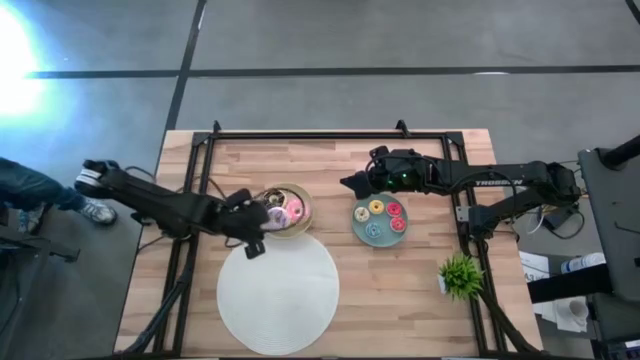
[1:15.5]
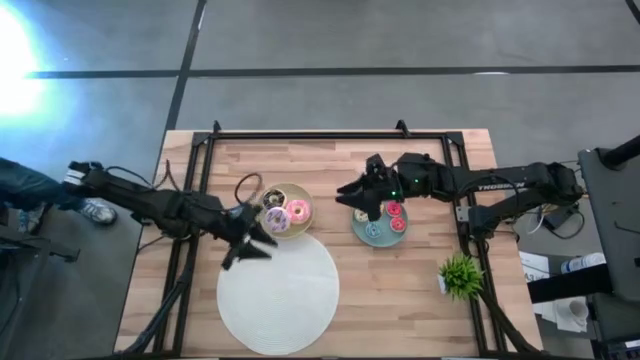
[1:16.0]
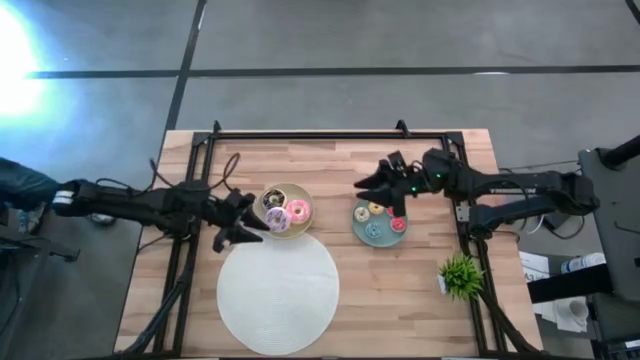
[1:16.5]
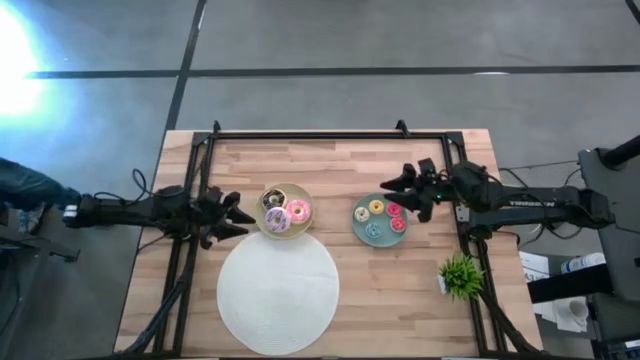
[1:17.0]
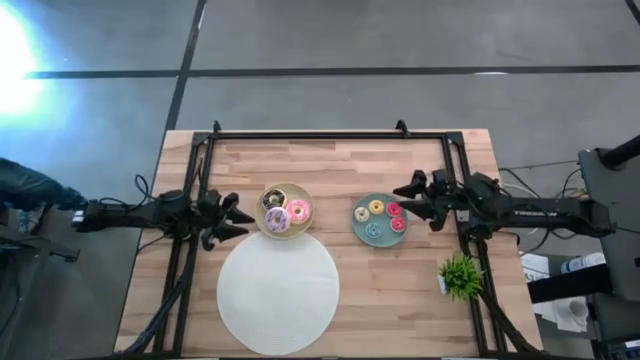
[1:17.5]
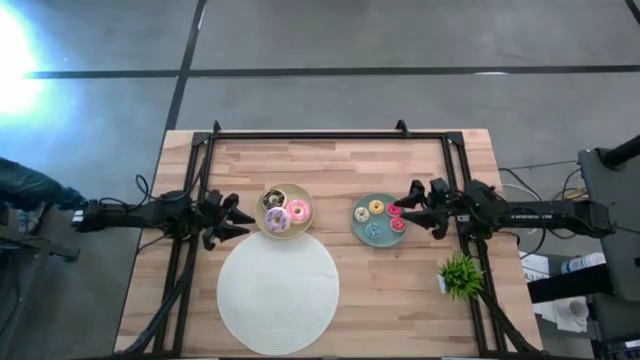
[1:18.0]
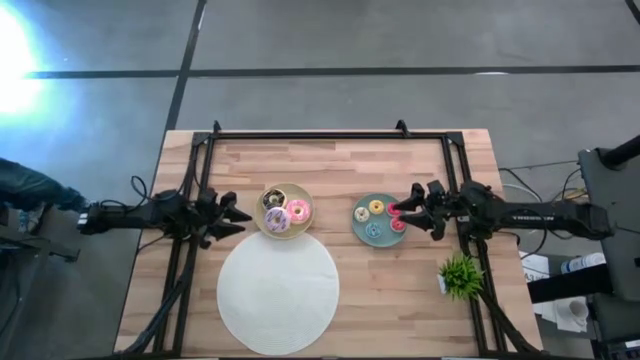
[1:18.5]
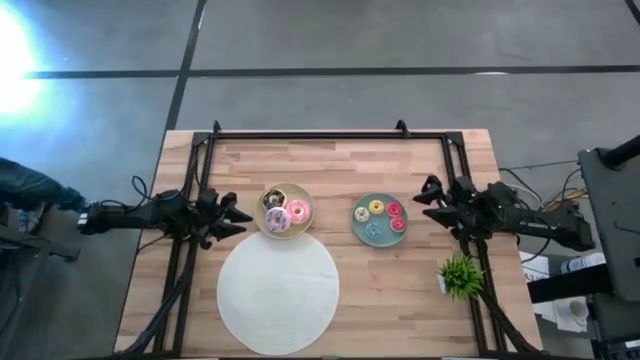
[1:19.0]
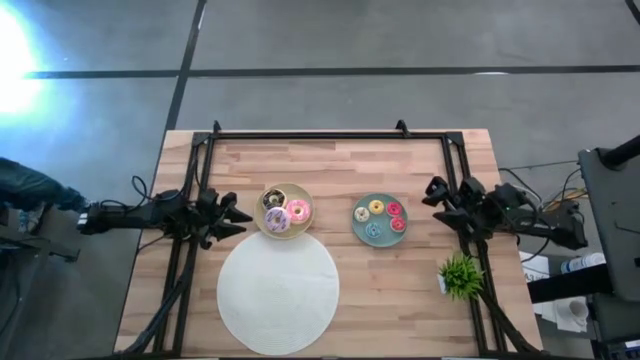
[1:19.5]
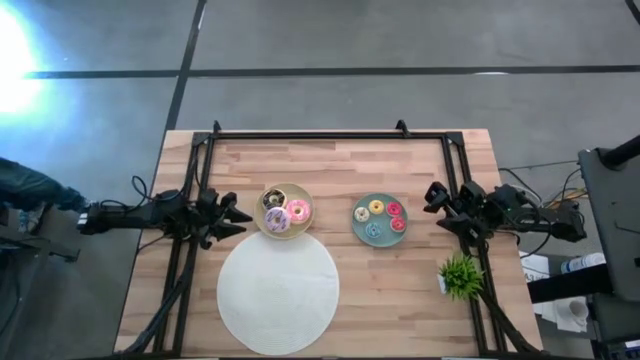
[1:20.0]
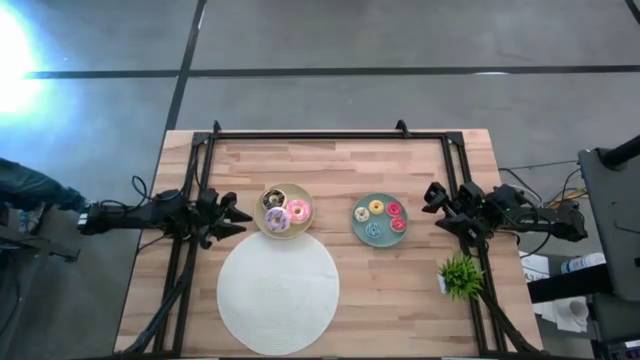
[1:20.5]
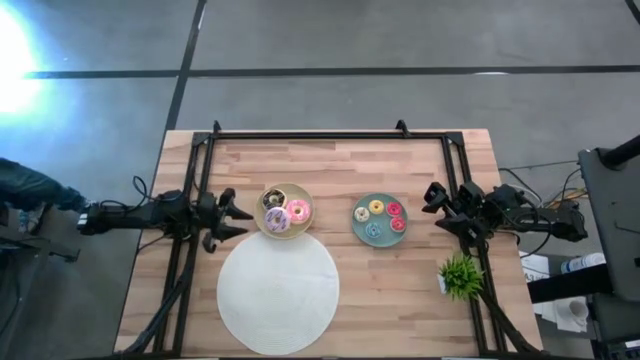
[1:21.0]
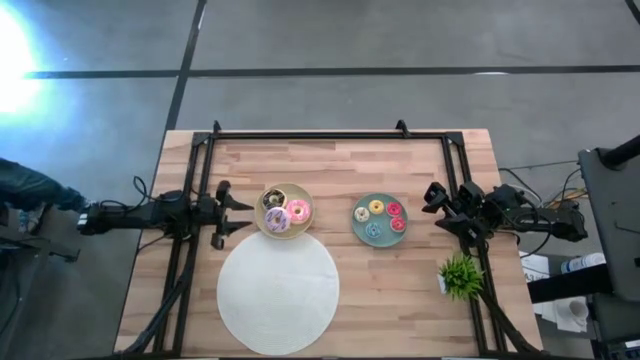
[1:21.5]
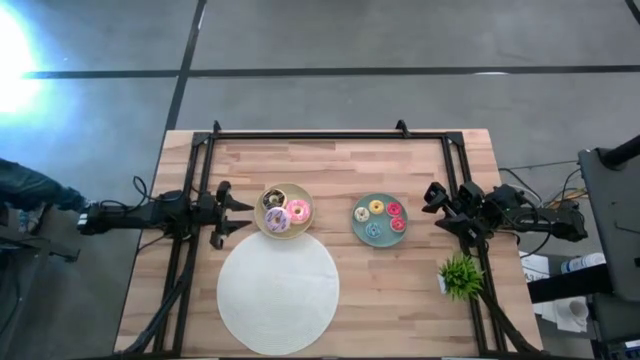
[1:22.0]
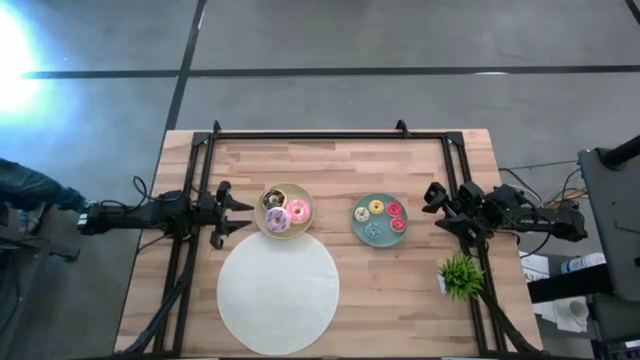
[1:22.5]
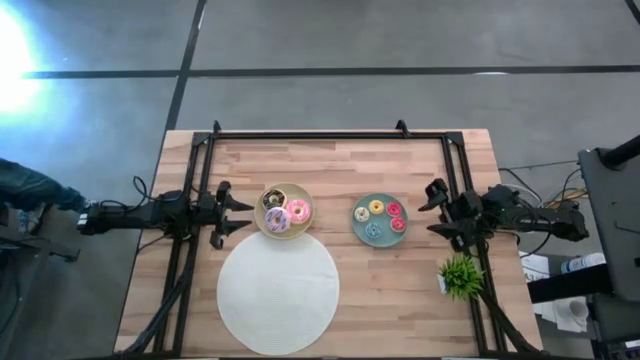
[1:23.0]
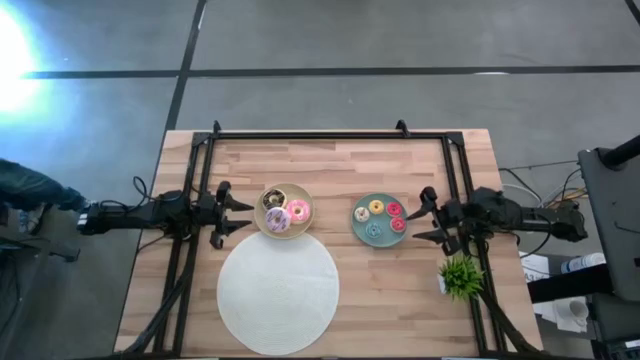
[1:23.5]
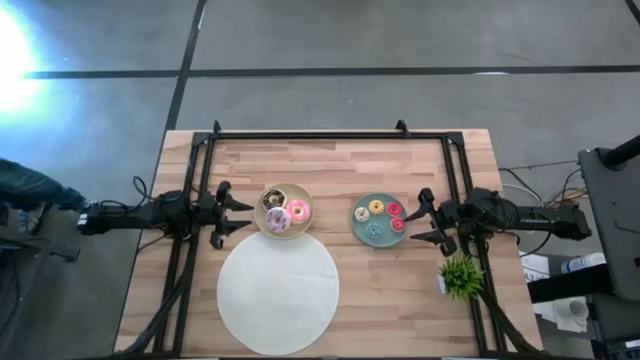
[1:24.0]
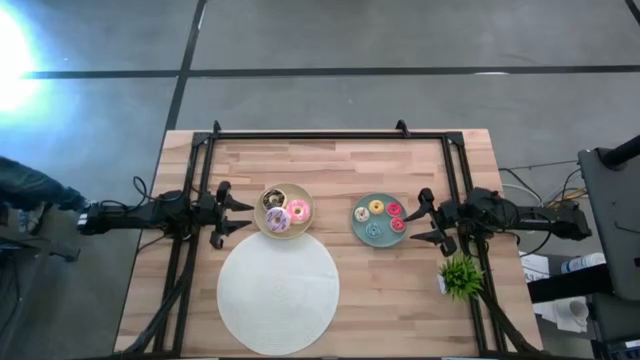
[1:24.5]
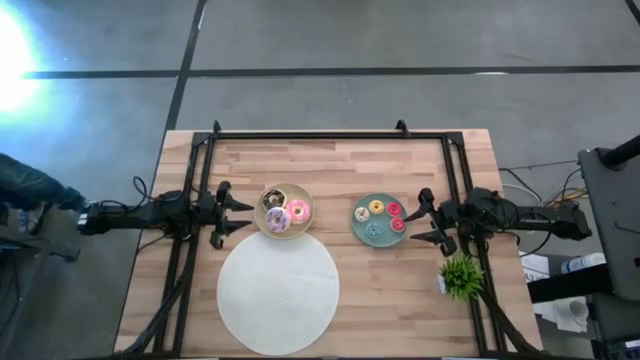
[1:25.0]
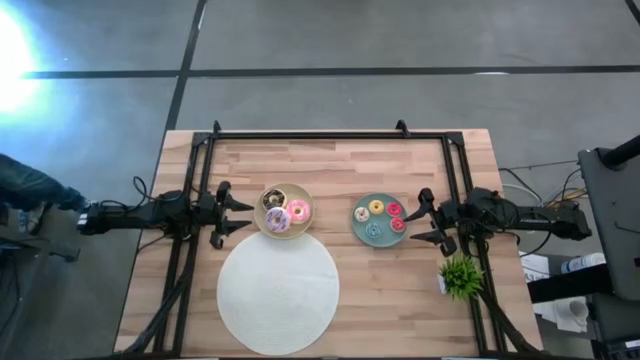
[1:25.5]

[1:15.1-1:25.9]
Task: Pick & Place donuts
Return to Home Position

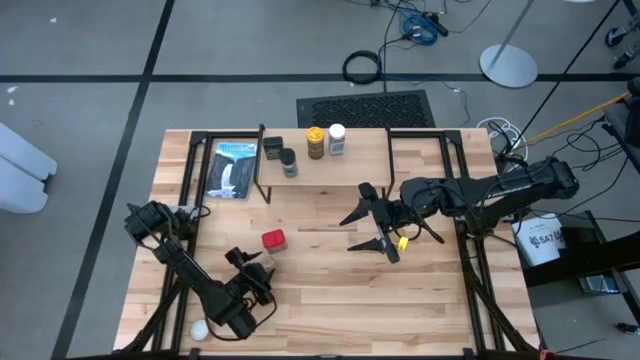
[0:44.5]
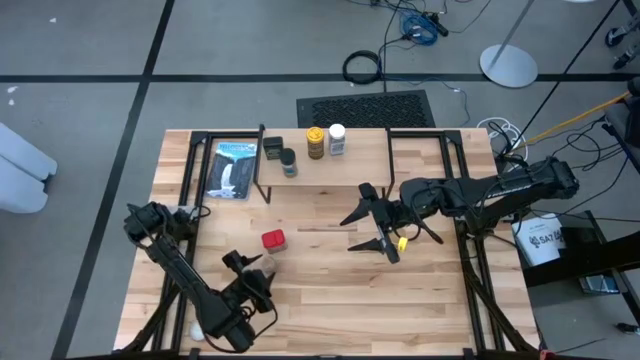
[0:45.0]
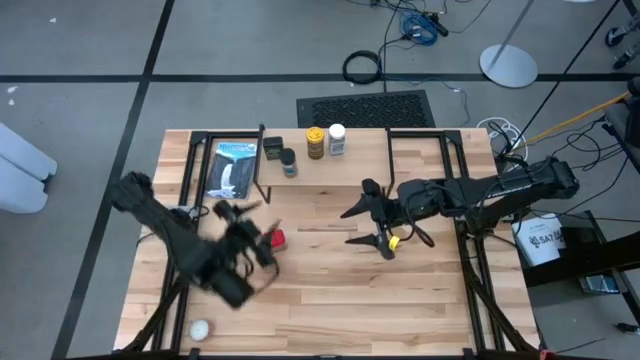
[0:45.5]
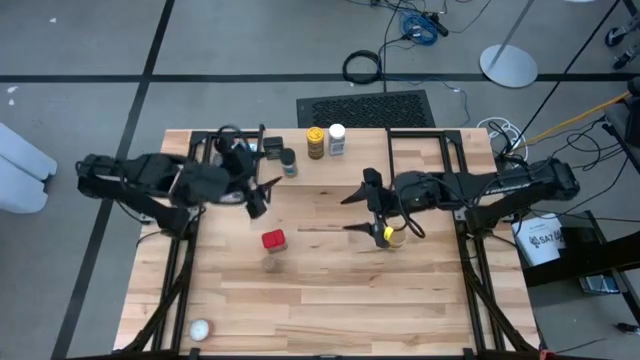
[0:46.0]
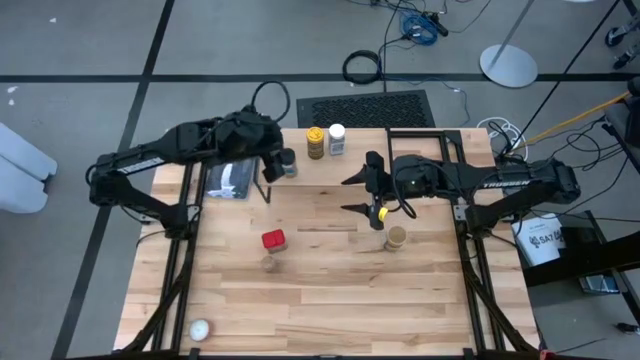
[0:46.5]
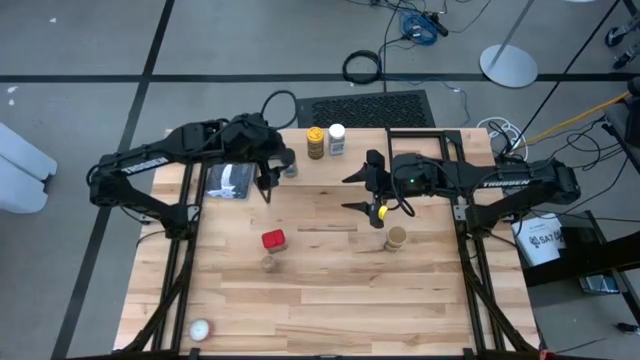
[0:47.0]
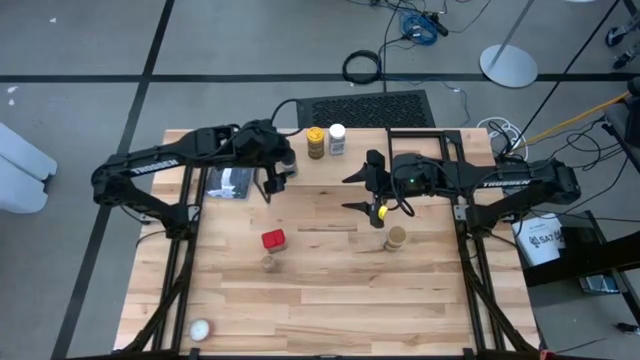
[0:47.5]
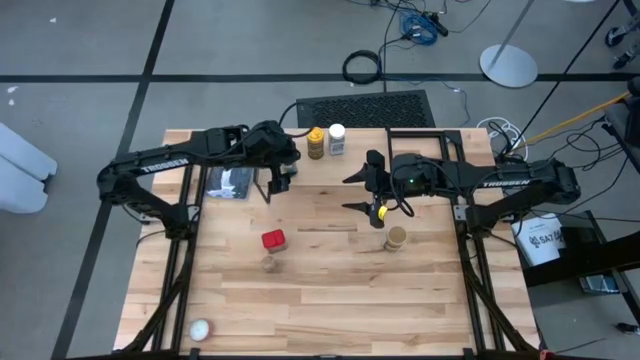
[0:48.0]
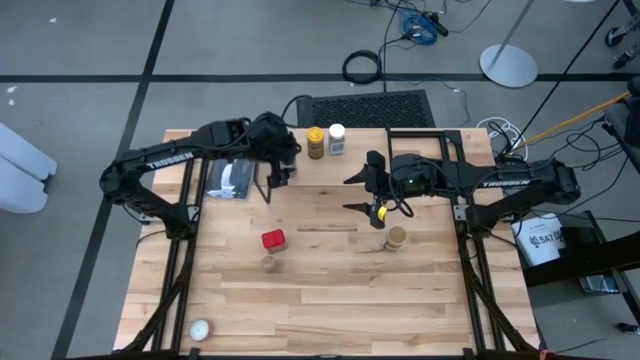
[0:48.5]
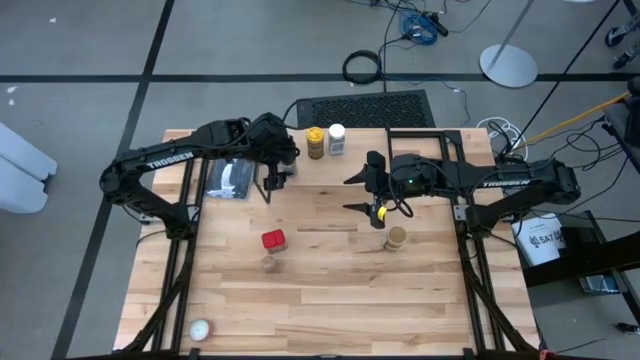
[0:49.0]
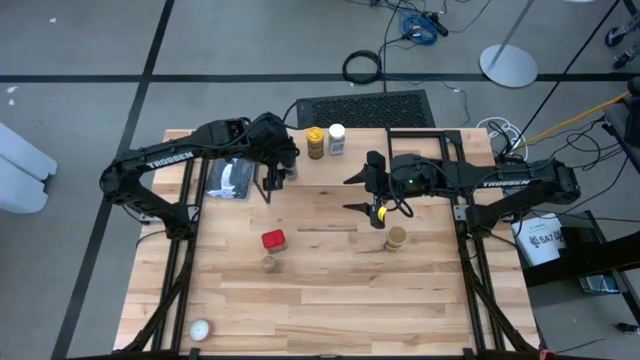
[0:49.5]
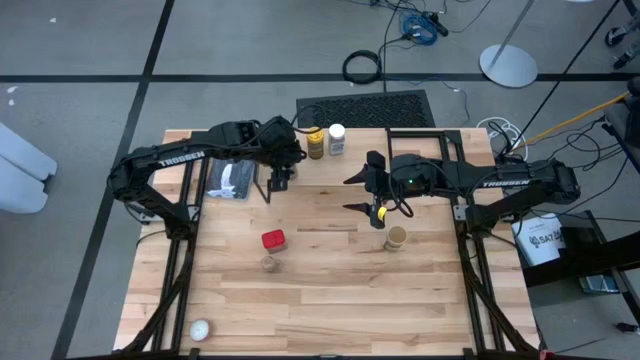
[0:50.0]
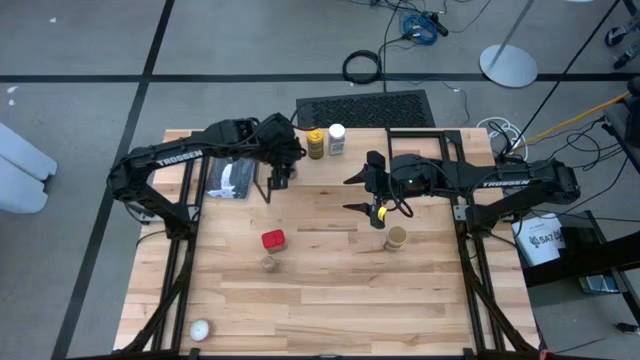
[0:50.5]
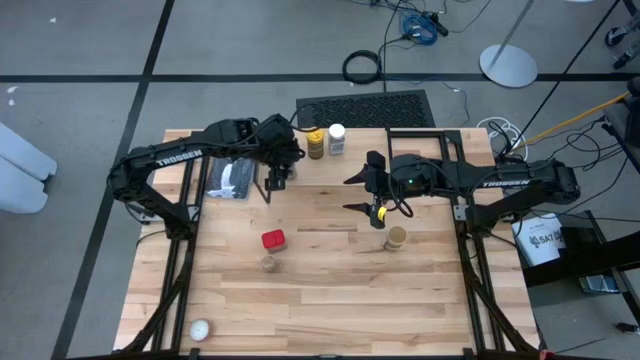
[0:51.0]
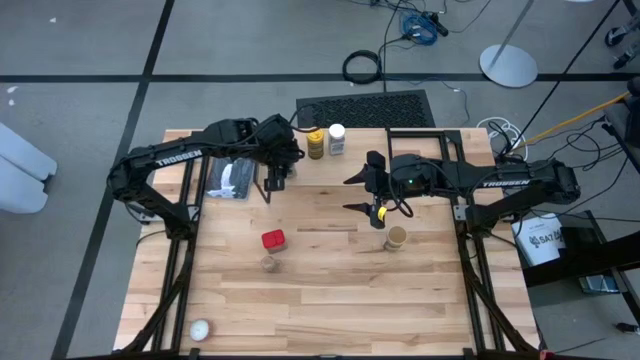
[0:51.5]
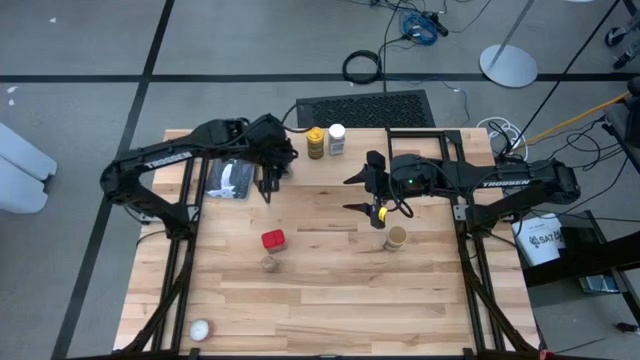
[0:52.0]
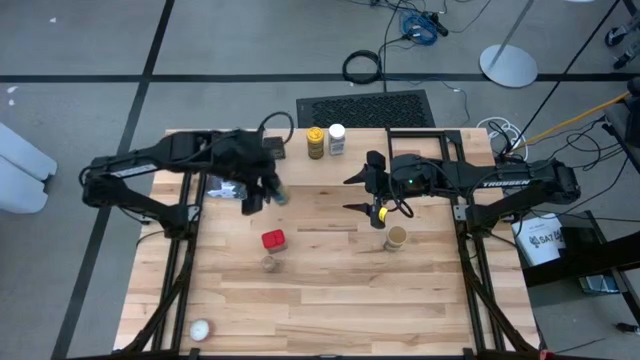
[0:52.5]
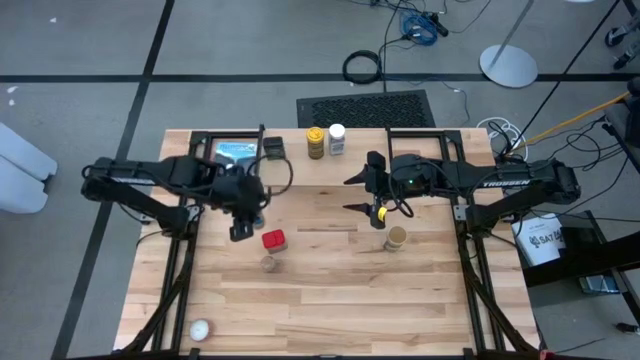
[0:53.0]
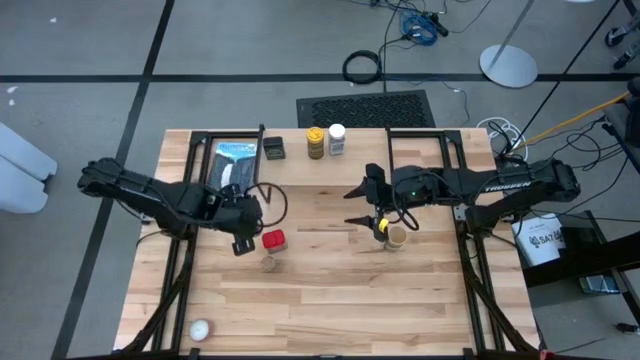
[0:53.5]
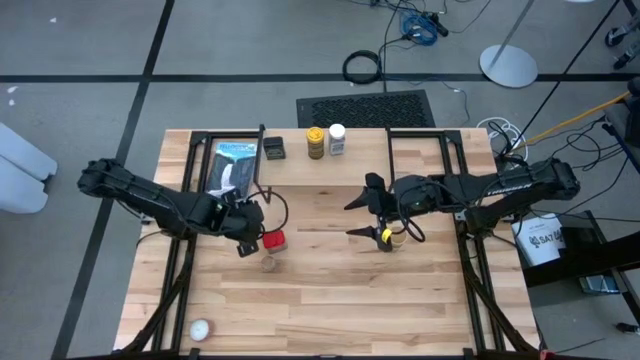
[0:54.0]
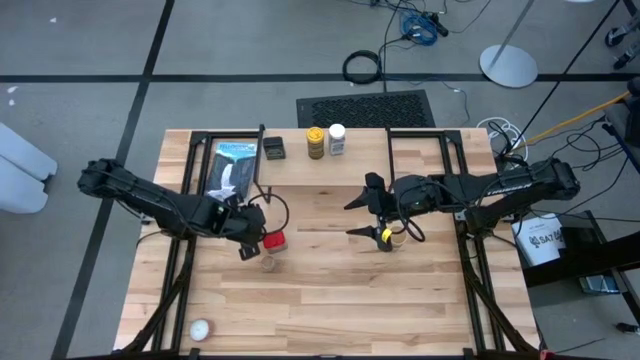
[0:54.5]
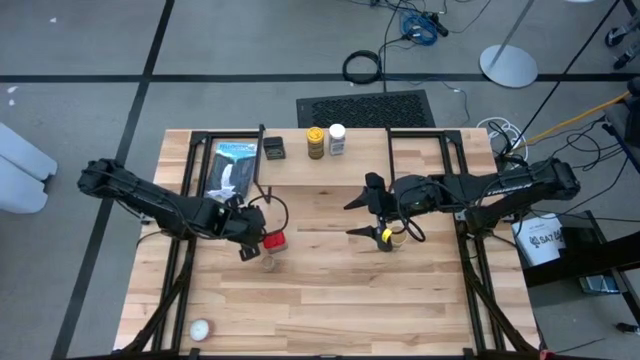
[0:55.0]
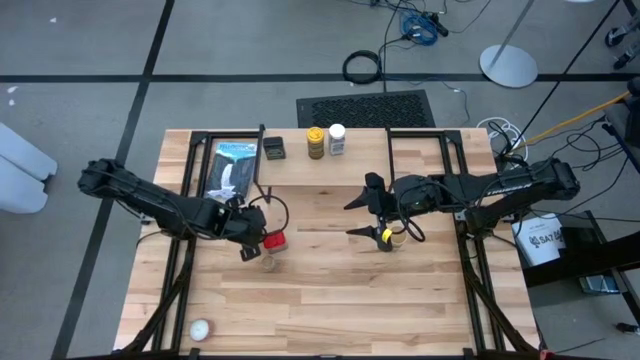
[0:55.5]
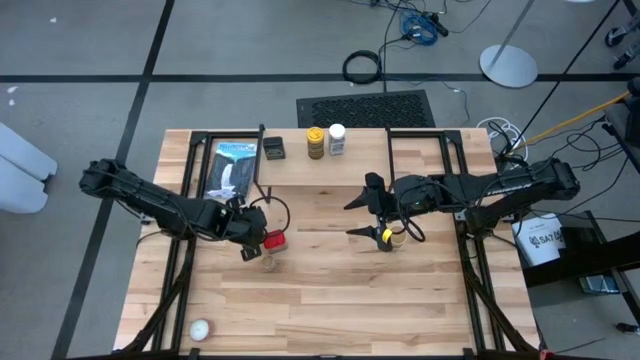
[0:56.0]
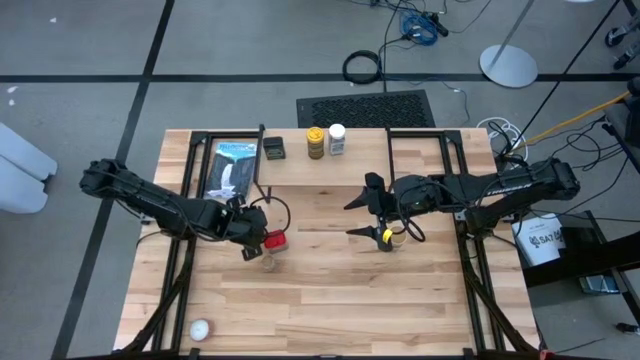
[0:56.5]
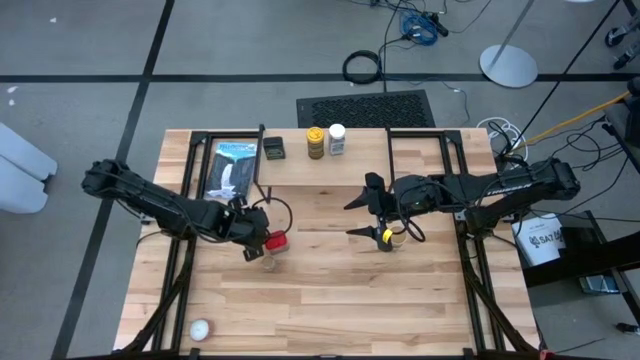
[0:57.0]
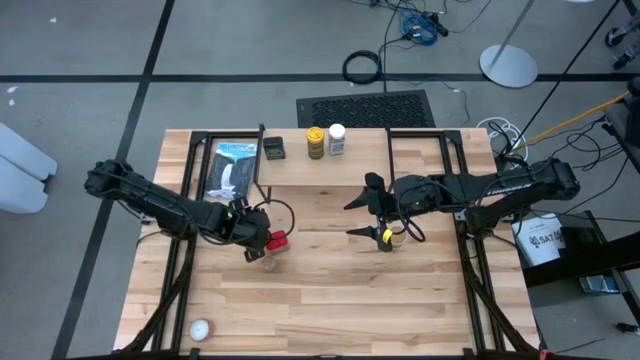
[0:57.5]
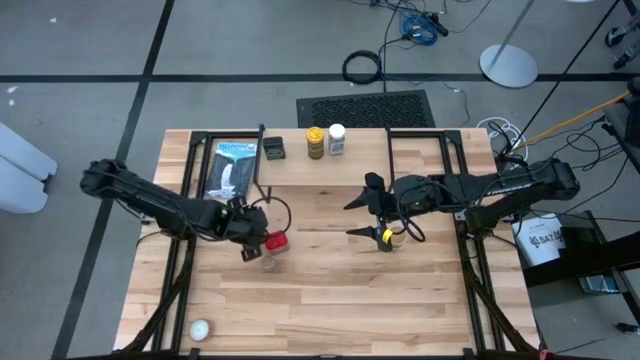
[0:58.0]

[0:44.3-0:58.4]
Task: Shelf spices
Remove the black seasoning bottle from the shelf
